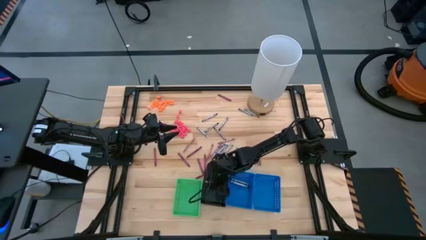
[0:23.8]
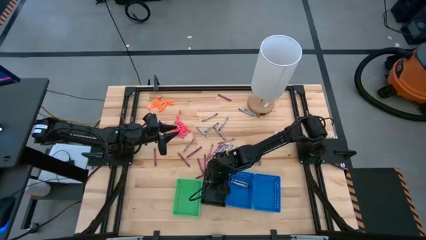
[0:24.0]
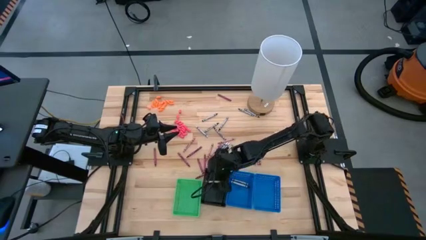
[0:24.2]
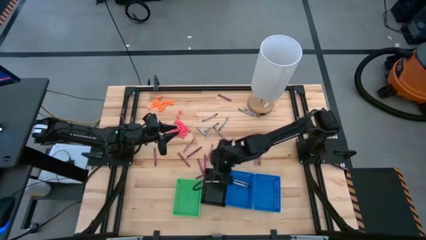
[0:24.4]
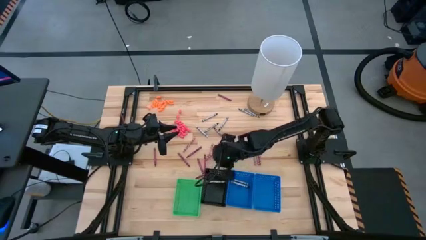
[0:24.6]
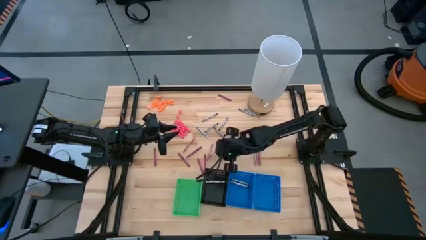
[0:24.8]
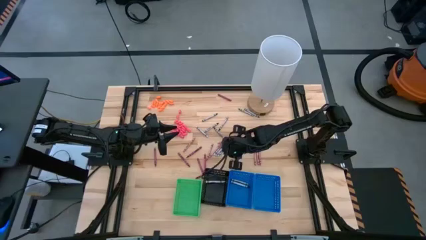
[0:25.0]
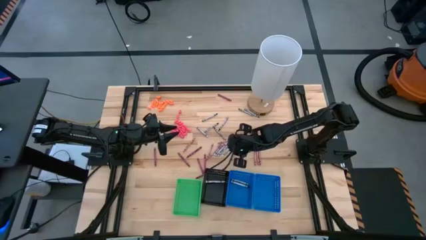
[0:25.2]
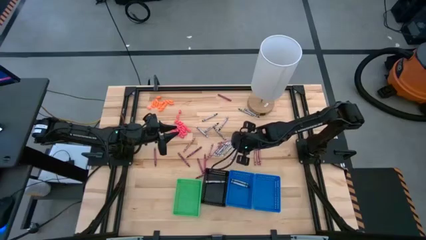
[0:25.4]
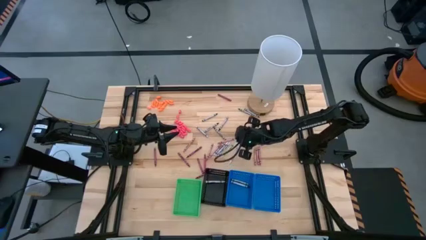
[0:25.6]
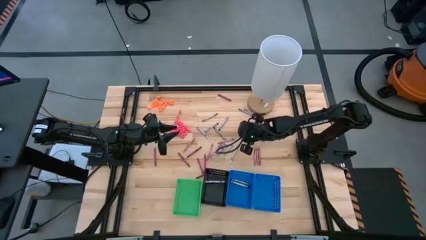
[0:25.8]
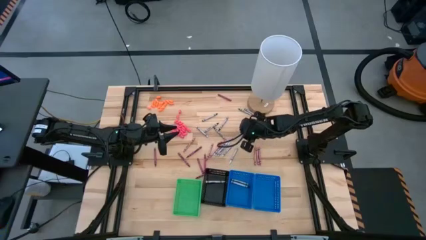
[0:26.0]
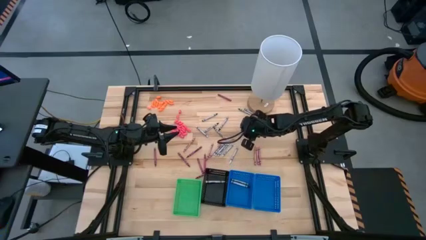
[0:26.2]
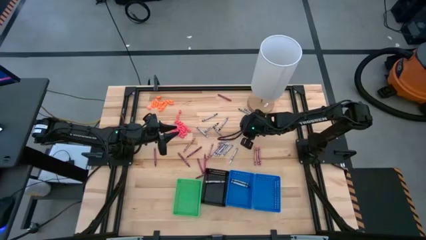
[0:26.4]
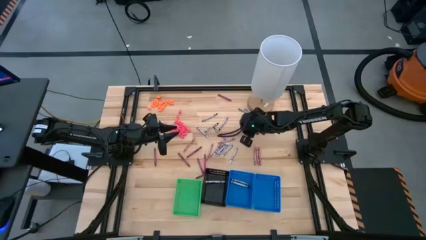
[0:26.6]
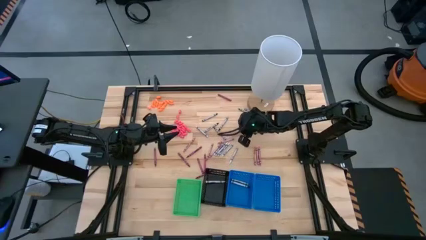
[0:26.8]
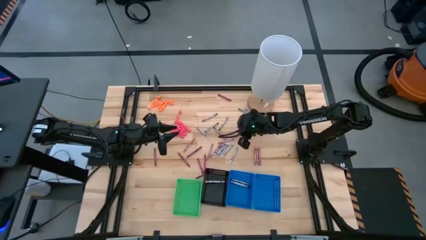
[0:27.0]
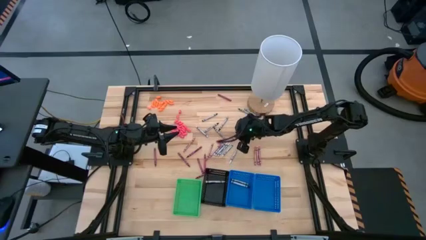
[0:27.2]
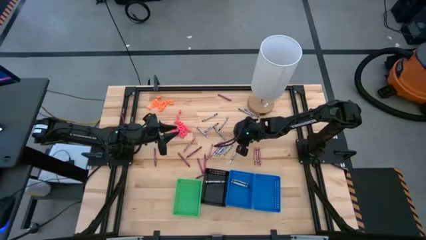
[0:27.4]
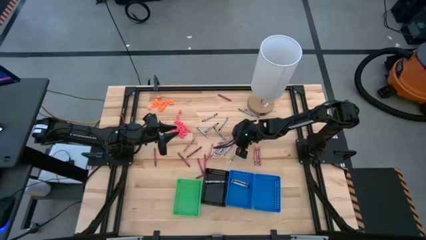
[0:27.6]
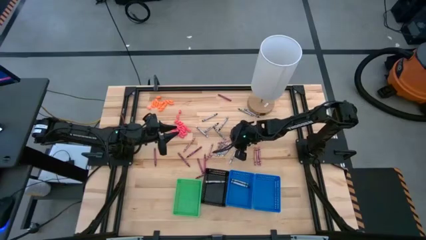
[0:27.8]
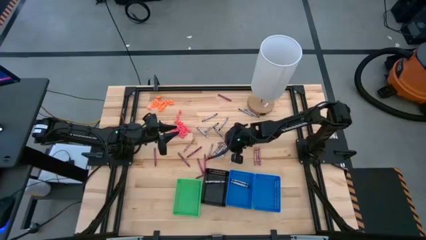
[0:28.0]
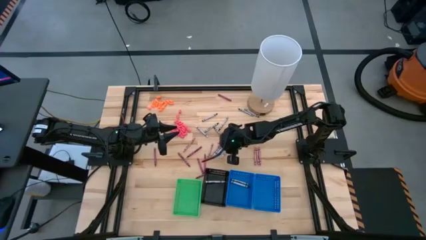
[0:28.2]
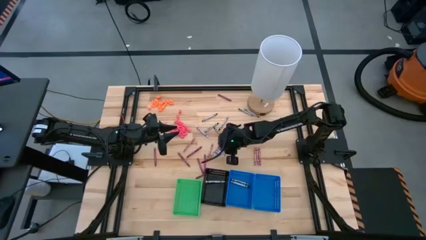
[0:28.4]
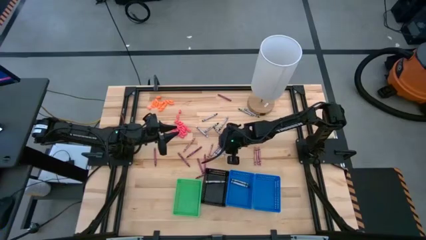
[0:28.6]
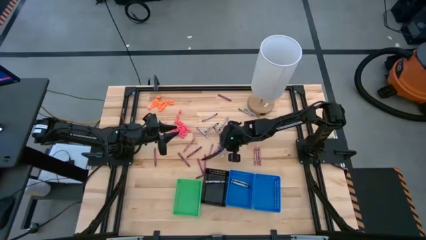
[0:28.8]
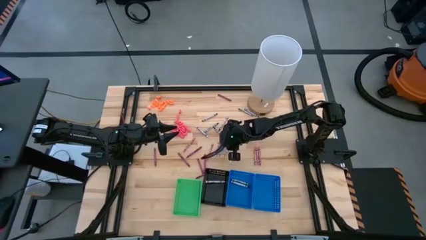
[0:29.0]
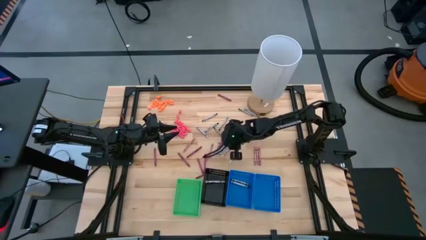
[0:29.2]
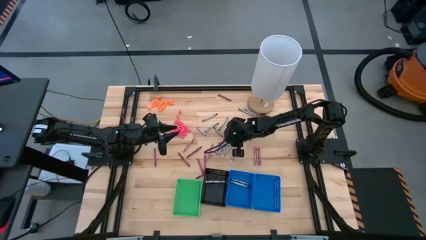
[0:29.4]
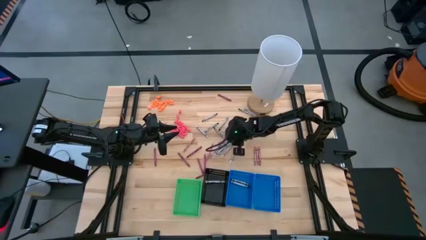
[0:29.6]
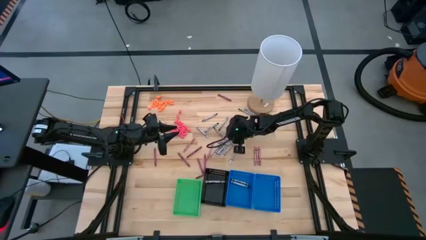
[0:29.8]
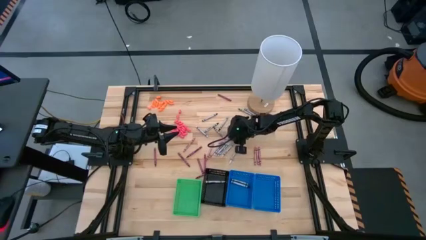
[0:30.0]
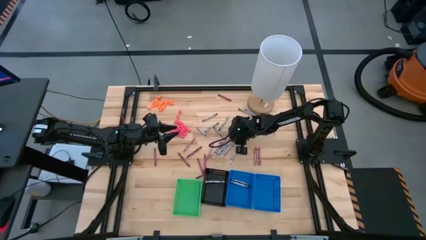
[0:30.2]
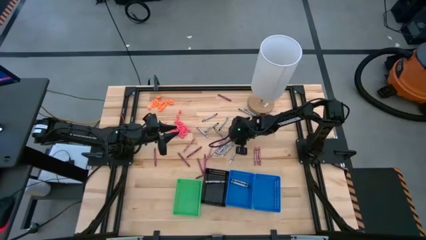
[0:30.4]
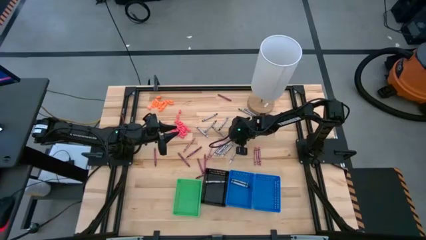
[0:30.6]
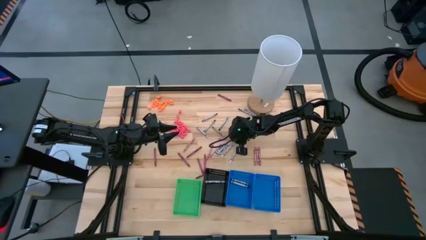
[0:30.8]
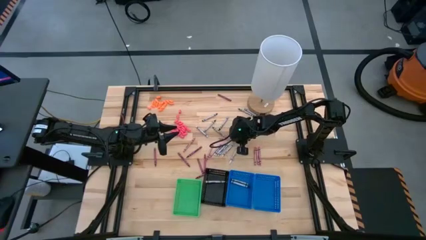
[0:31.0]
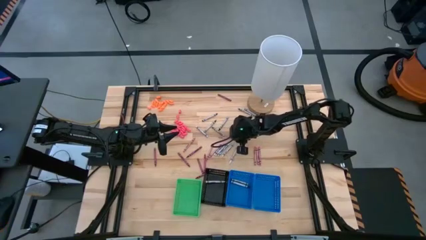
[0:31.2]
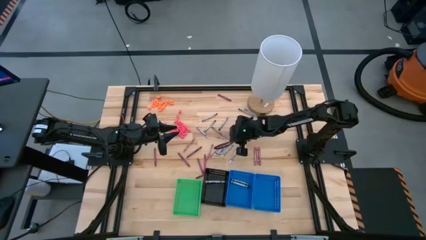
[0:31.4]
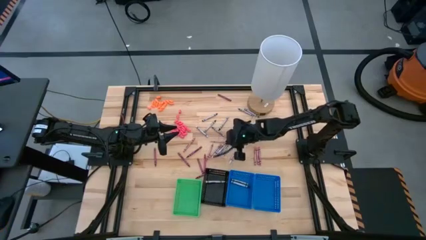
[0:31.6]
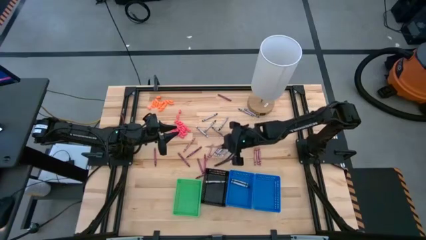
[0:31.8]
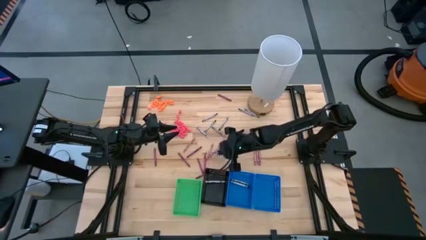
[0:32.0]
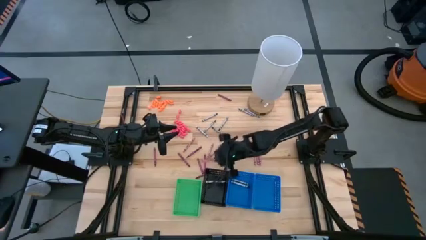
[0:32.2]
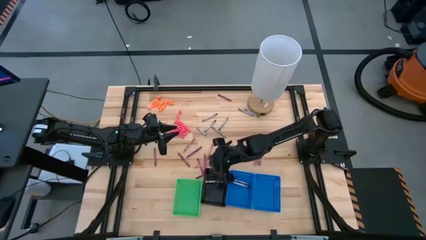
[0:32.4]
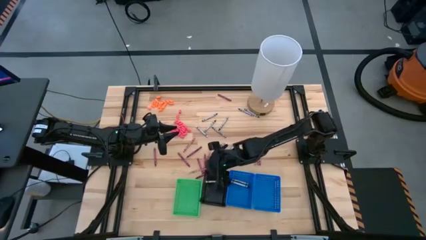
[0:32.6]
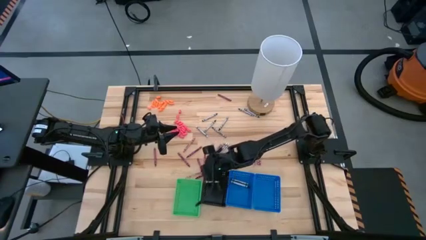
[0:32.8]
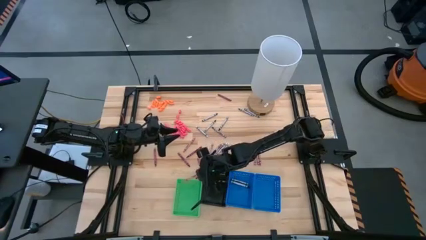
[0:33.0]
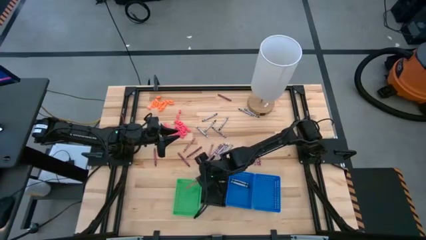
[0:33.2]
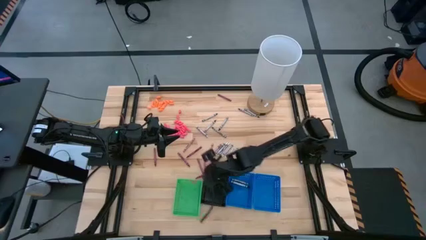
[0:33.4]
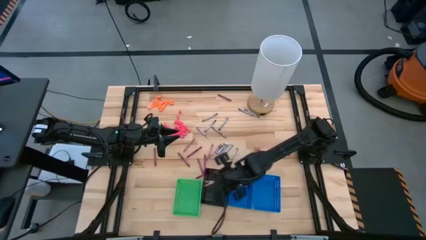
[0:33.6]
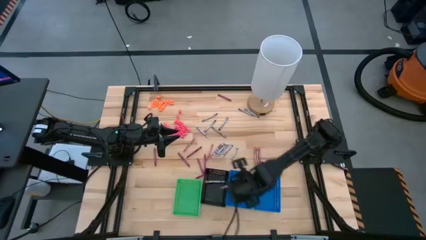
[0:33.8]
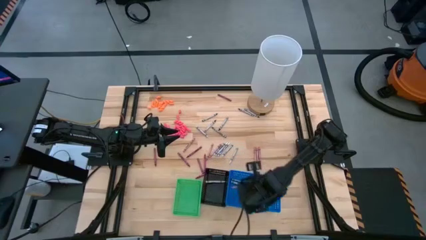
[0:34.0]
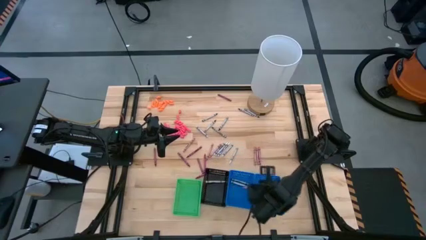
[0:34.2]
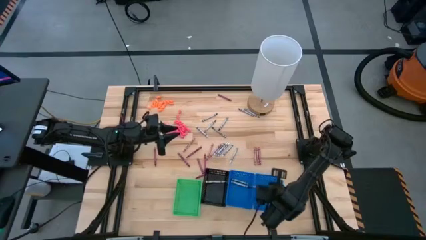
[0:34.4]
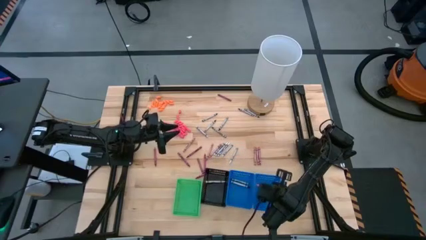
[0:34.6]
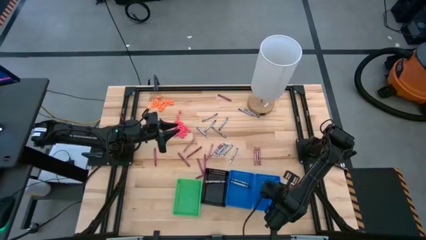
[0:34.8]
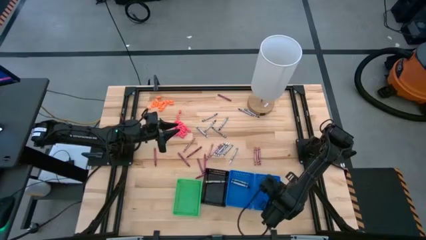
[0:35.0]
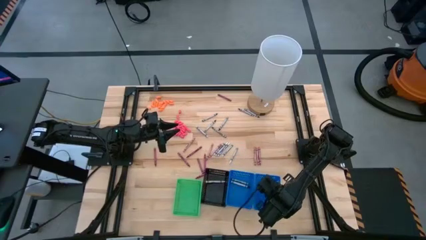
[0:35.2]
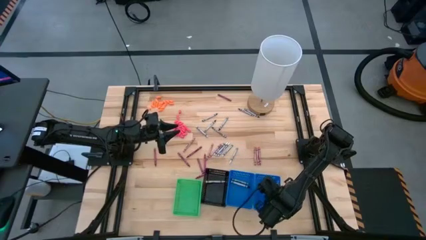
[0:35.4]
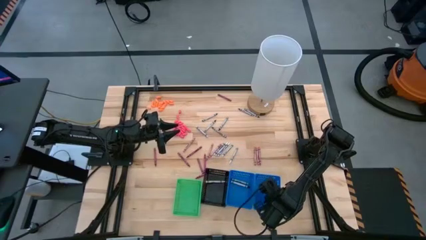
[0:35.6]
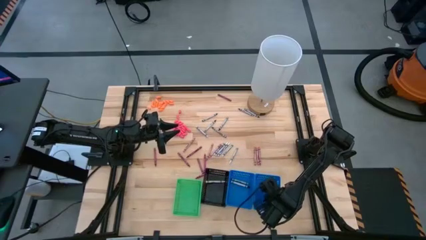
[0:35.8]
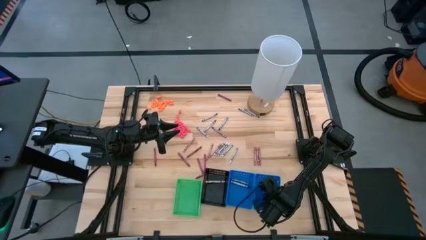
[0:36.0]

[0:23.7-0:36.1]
Task: Sort crayons
Put the pink crayon into the right blue bin

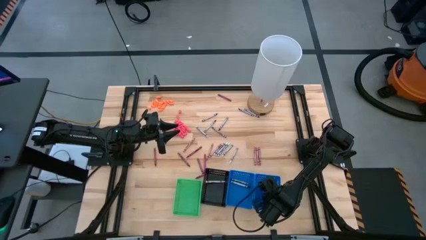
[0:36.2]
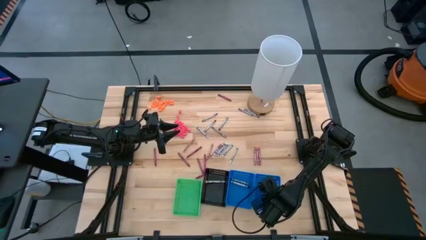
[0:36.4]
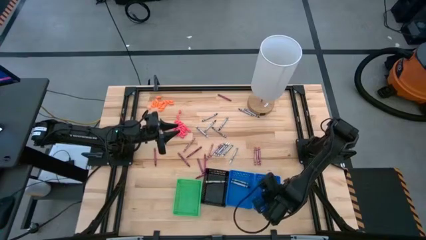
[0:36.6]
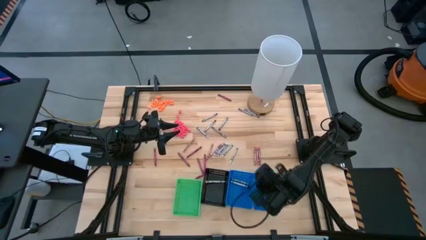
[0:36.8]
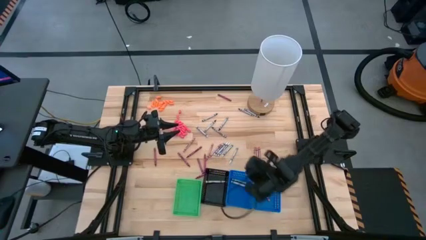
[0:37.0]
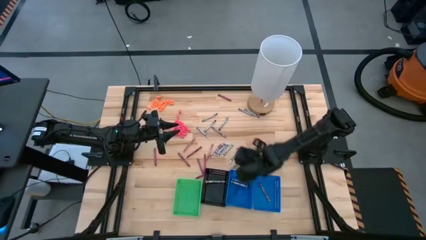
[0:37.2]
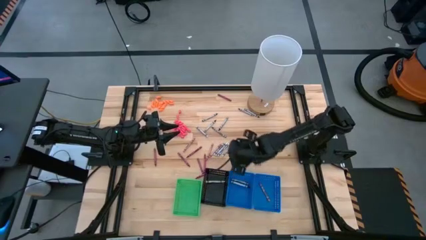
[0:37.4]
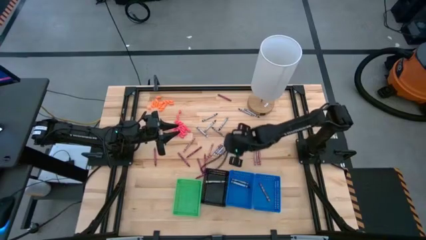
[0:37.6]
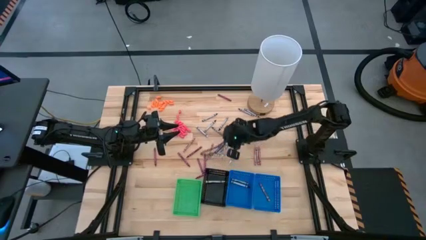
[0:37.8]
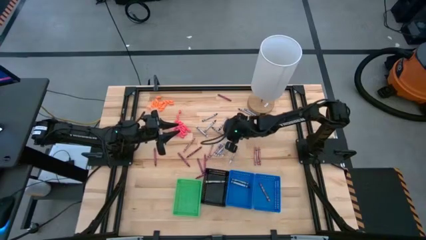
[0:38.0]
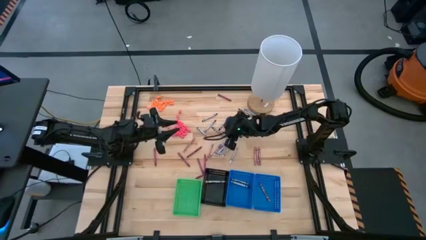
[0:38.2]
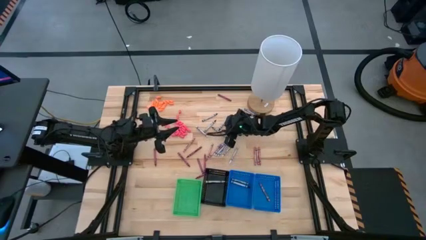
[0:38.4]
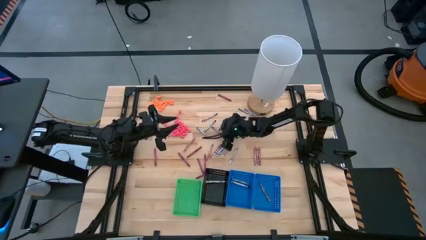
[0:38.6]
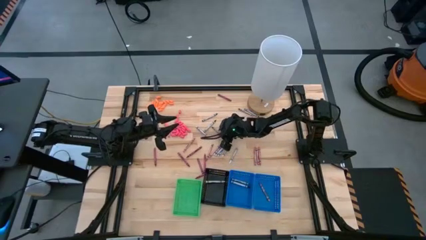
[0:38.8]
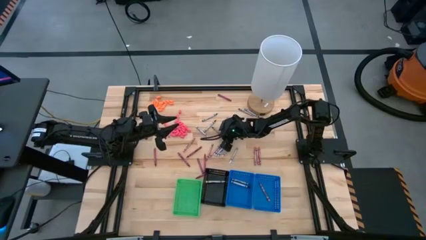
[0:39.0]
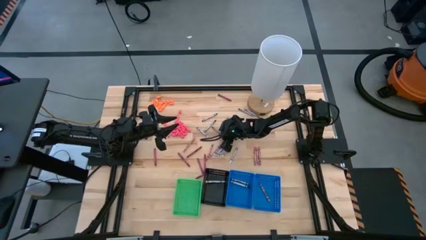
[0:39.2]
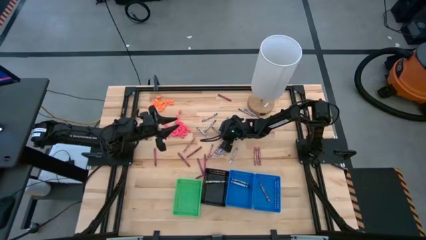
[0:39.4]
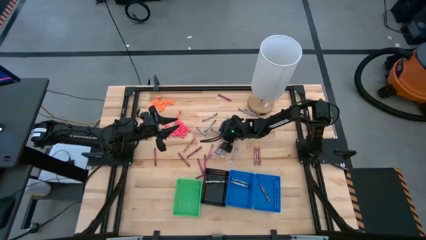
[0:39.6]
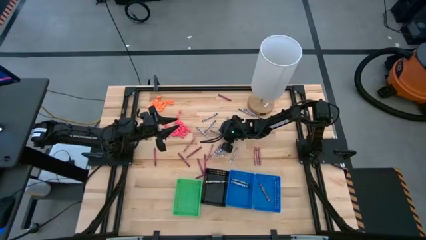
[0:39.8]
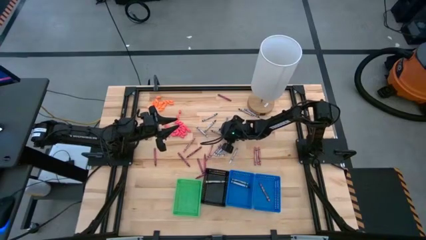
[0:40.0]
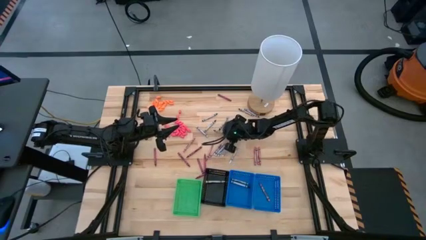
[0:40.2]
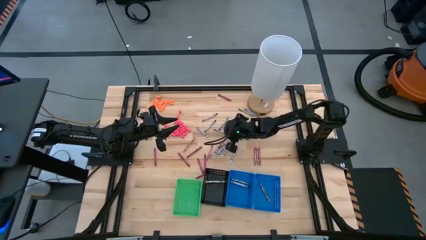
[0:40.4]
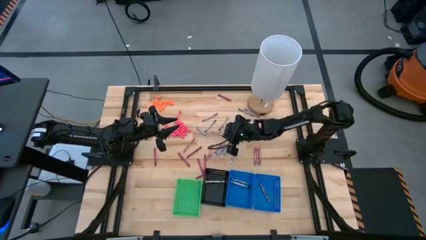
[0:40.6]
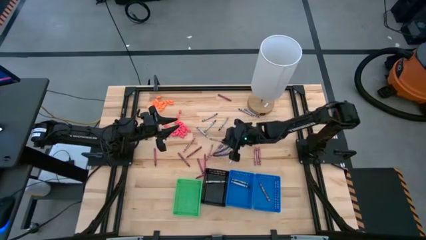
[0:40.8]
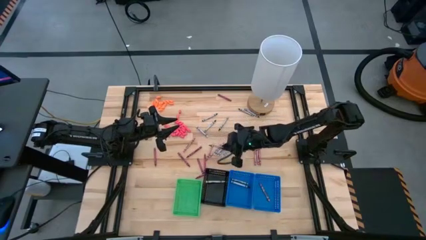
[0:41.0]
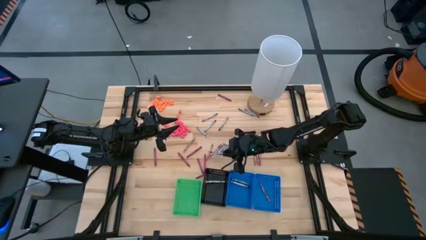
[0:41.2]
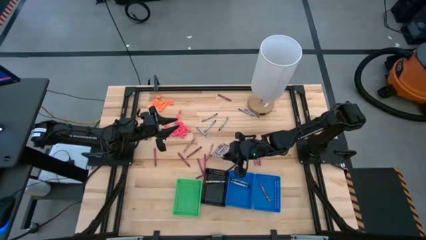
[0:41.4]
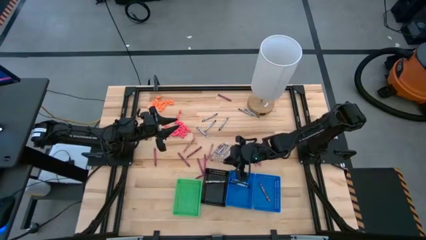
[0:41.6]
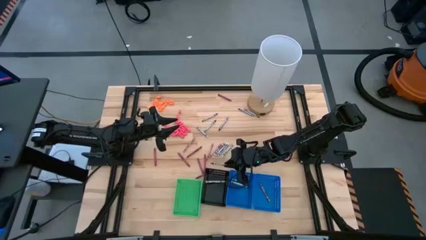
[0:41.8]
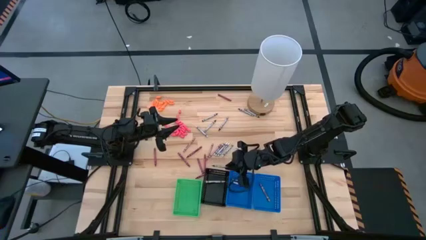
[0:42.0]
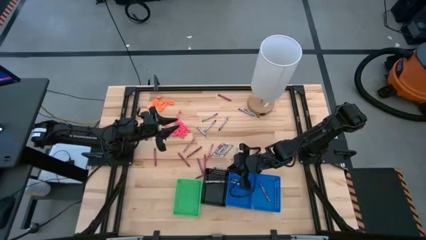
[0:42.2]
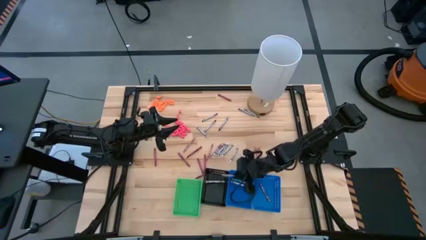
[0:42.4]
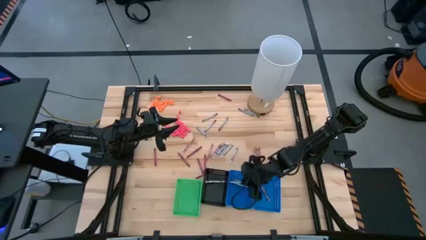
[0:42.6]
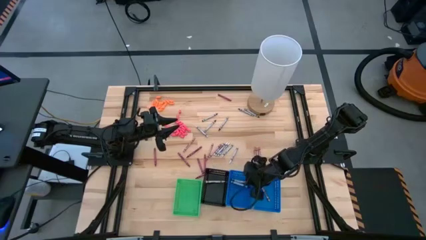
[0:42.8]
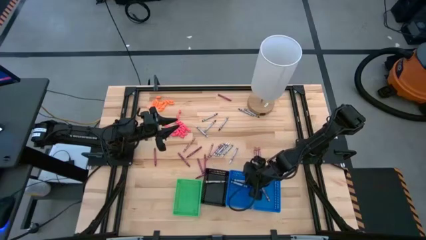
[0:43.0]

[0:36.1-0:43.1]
Put the black crayon into the left blue bin
